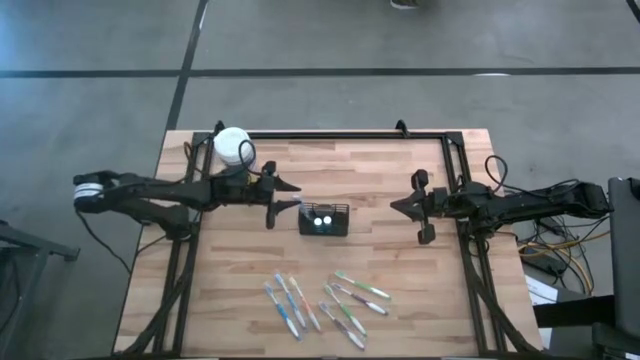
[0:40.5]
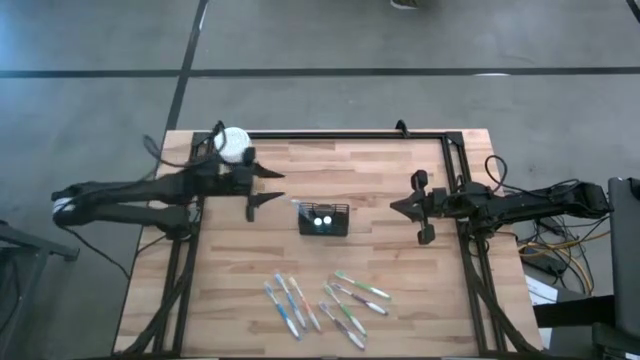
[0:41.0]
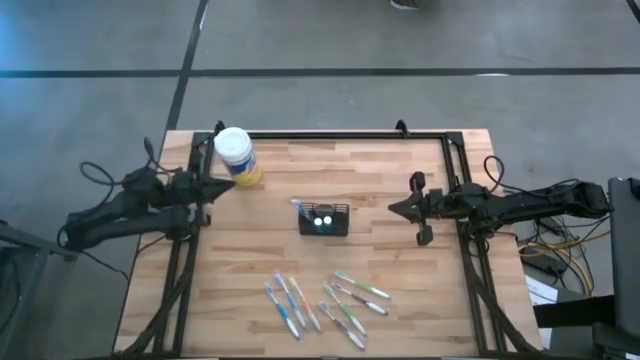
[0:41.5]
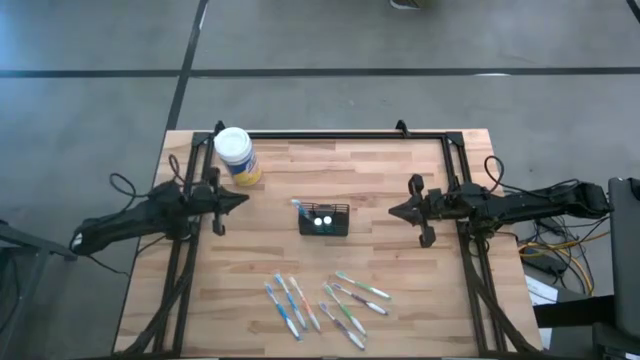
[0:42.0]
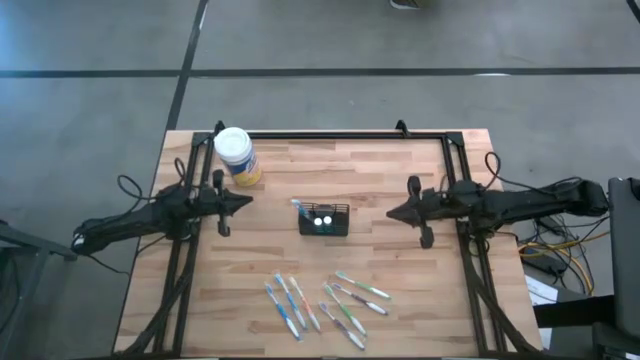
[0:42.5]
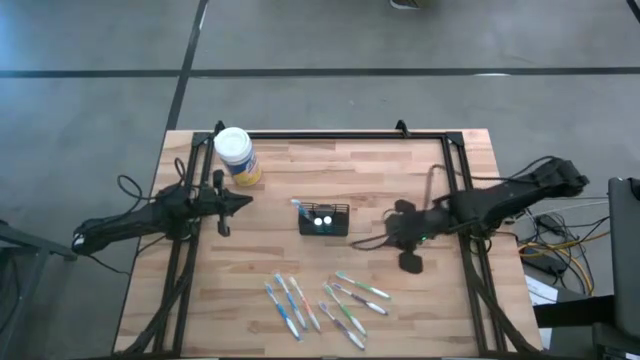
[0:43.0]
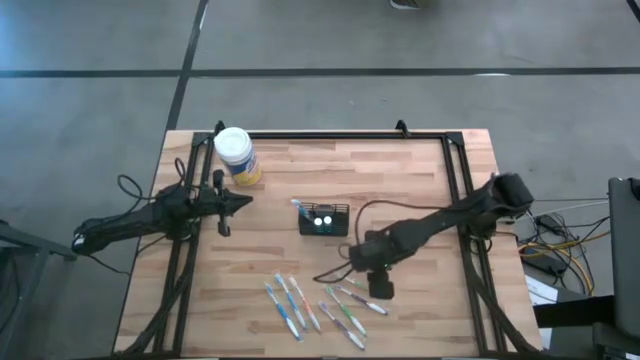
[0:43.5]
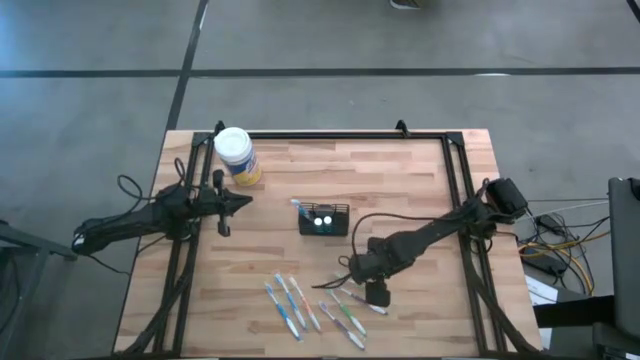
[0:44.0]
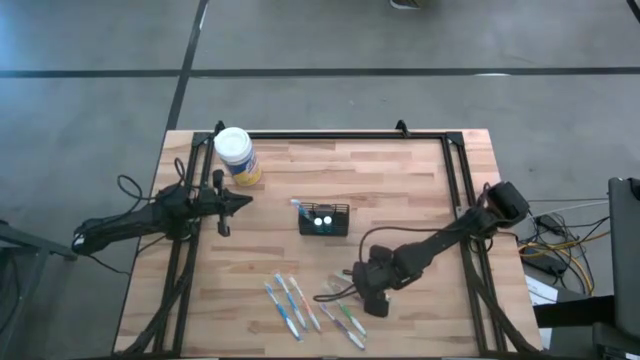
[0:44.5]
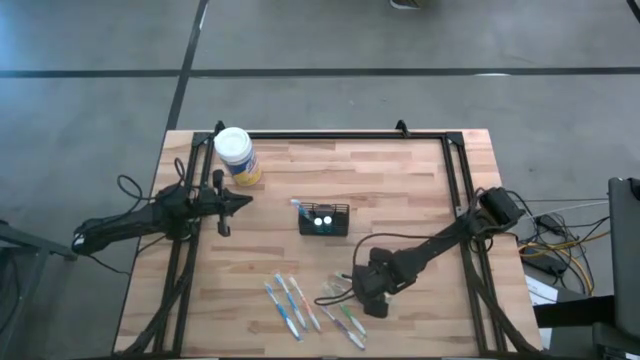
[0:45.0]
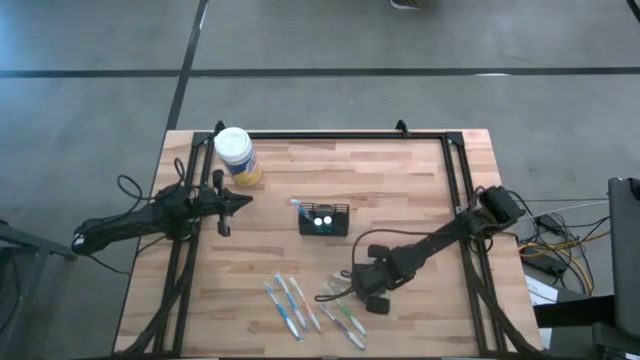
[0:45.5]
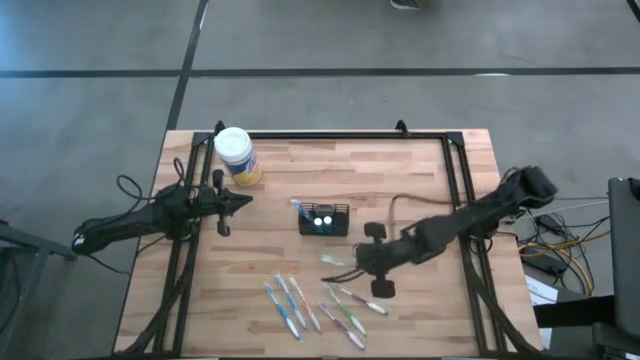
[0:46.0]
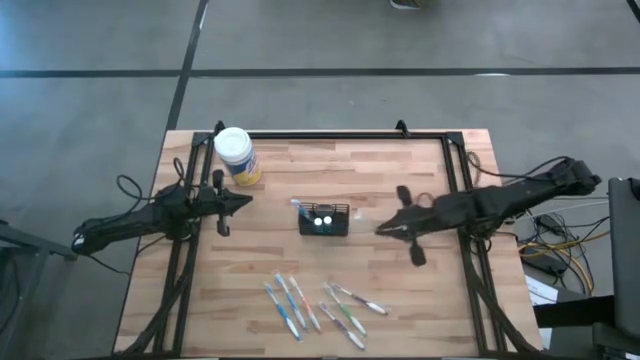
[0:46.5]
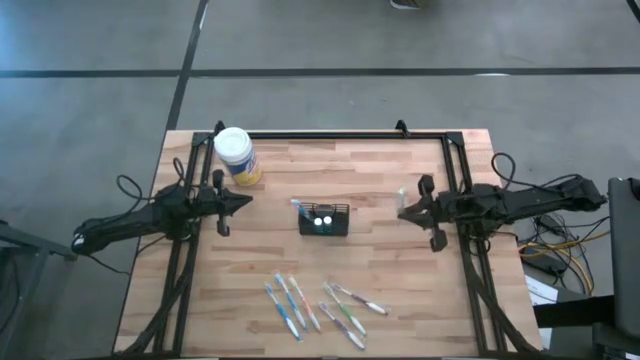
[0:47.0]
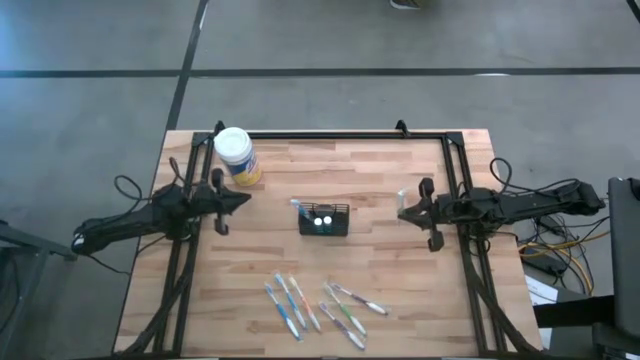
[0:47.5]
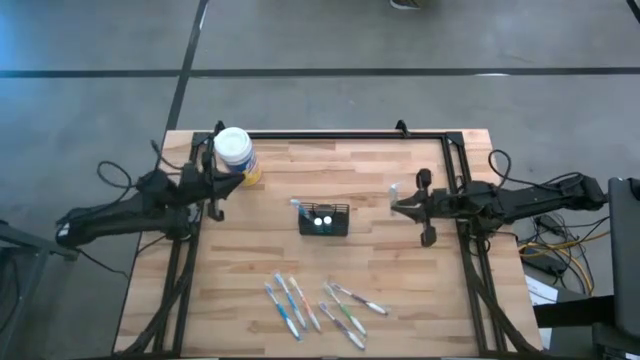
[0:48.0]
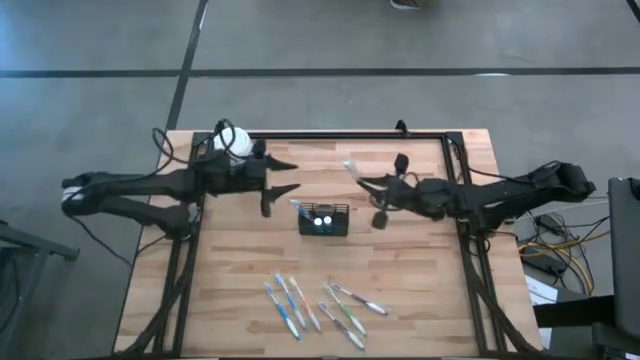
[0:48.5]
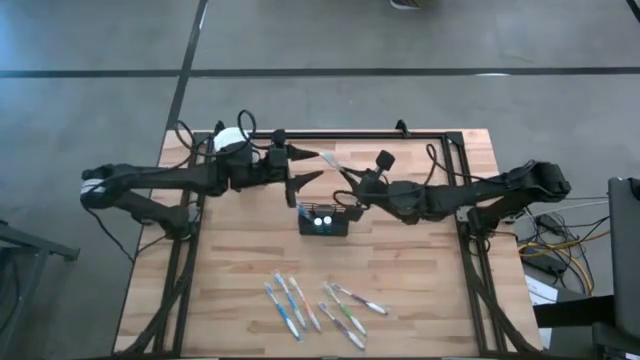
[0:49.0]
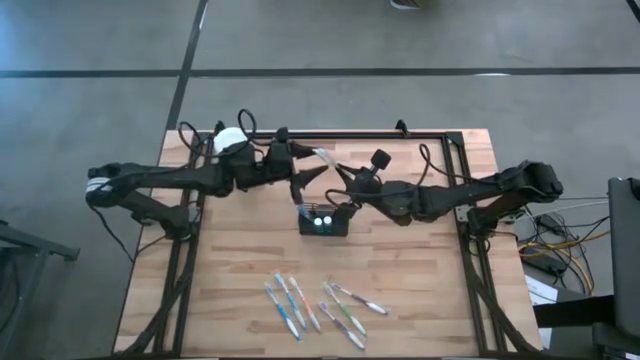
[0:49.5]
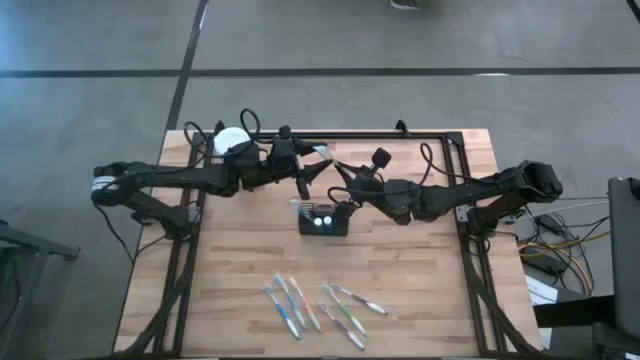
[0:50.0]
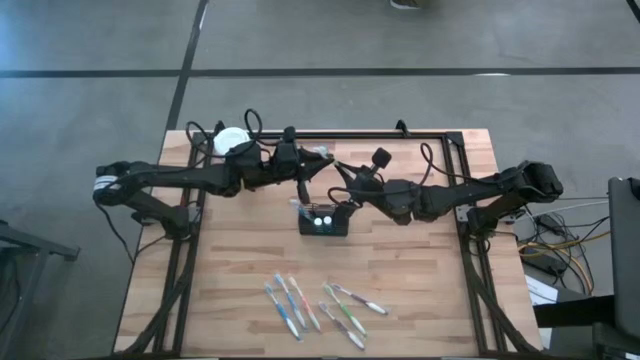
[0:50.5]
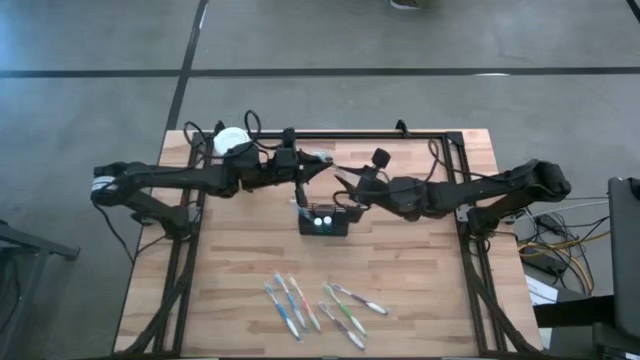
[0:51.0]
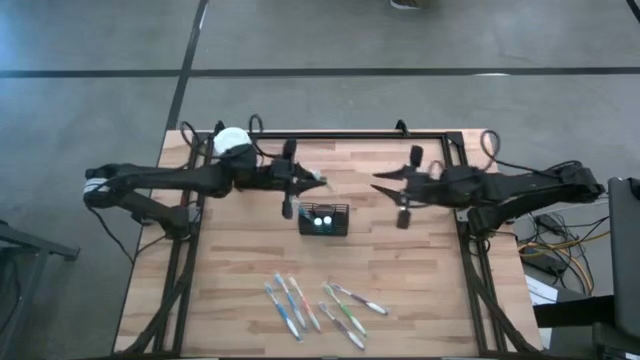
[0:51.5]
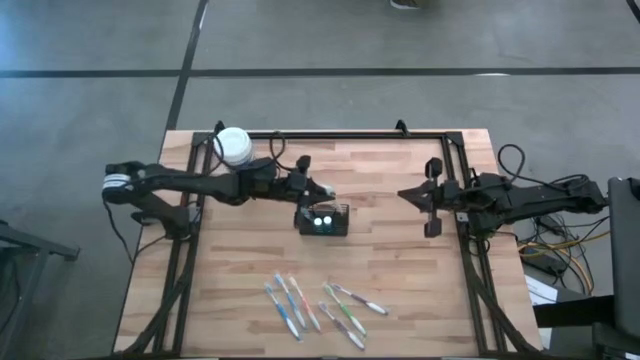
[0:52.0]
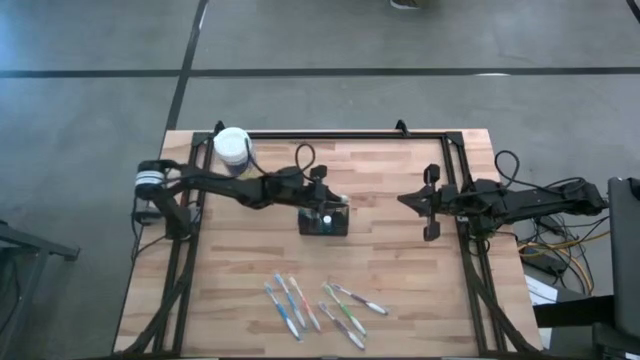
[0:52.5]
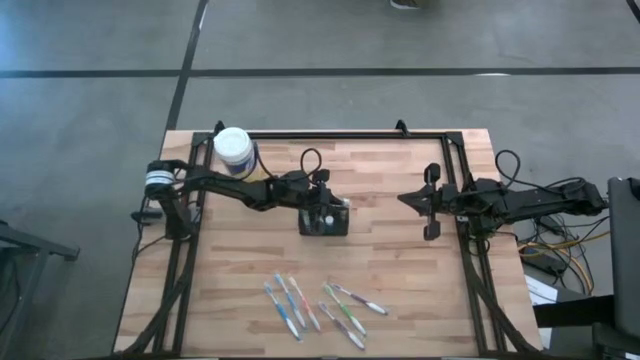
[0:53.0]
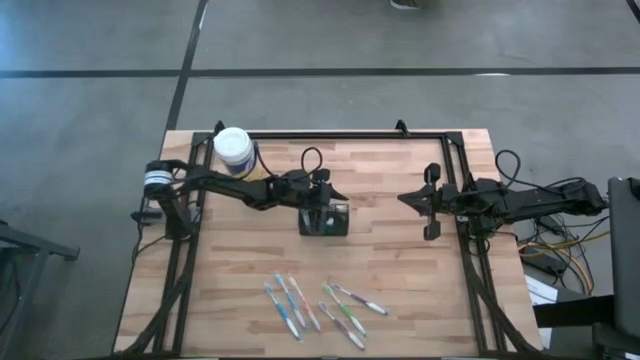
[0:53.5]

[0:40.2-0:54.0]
Task: Pick & Place toothbrushing station
Put the right green toothbrush into the wire organizer

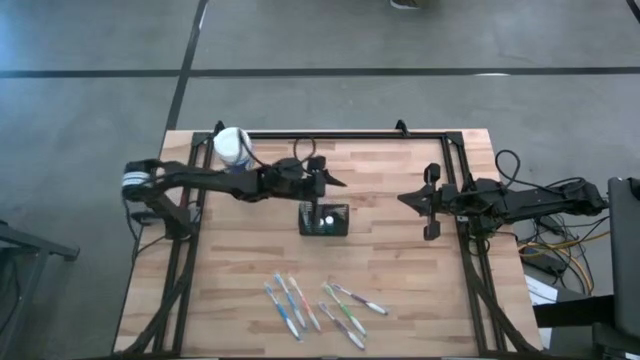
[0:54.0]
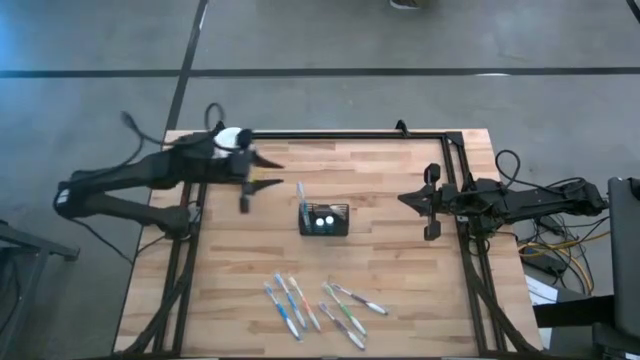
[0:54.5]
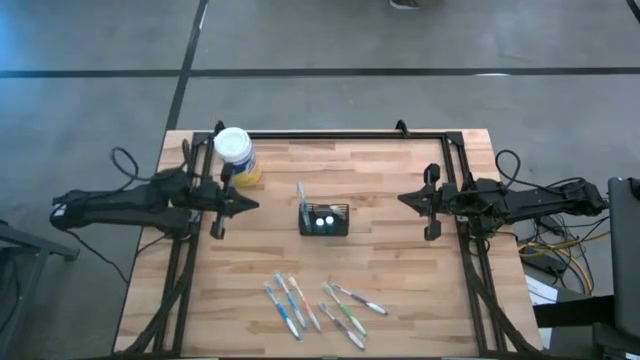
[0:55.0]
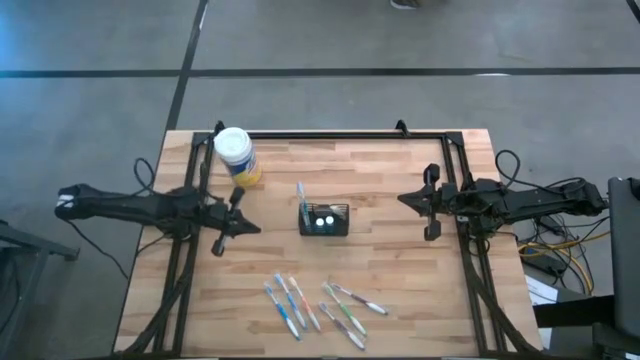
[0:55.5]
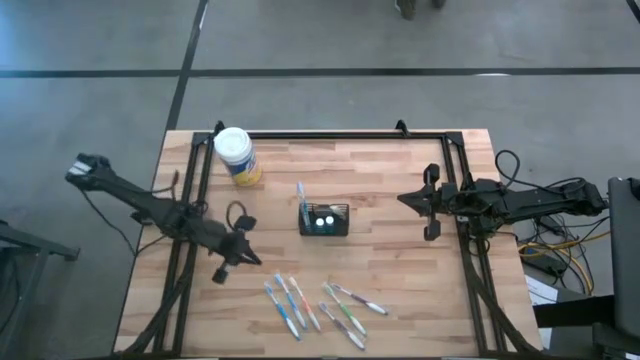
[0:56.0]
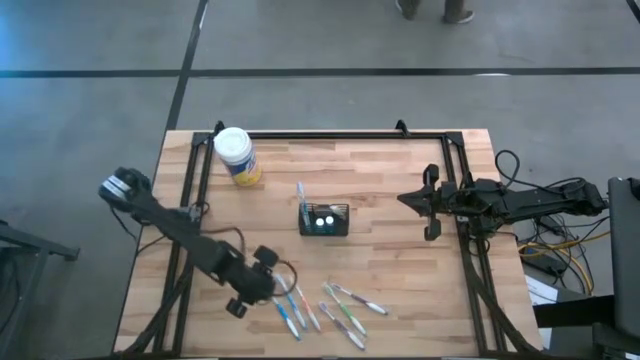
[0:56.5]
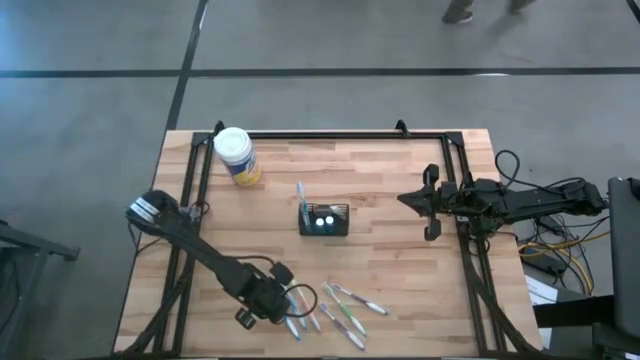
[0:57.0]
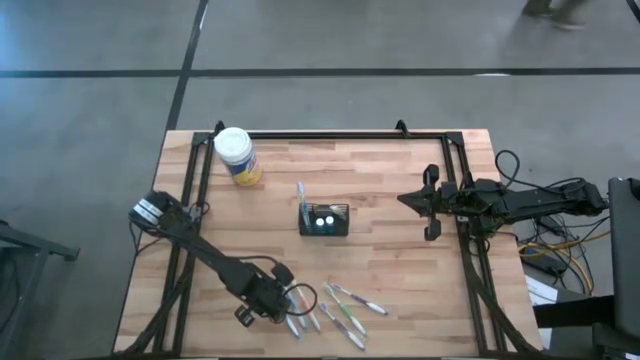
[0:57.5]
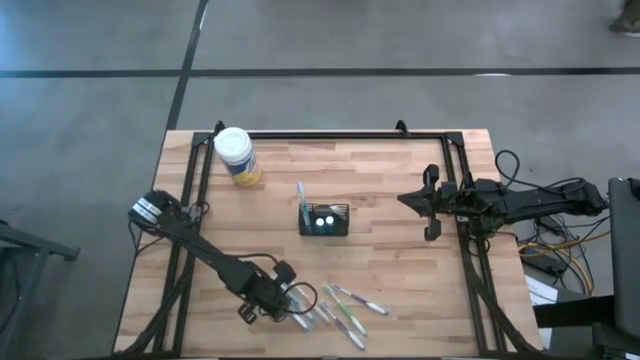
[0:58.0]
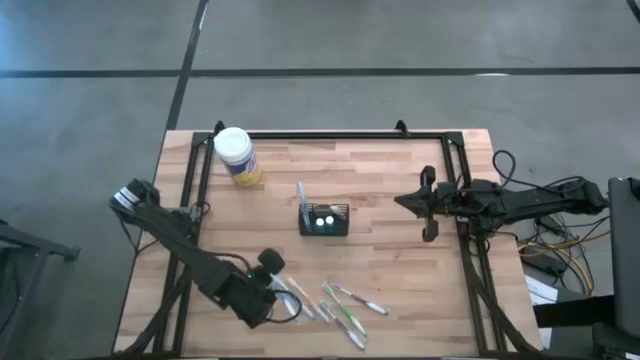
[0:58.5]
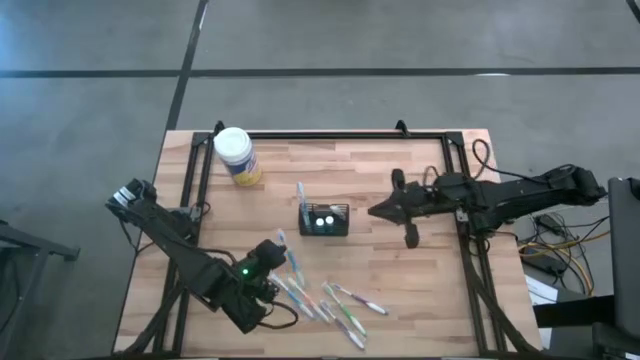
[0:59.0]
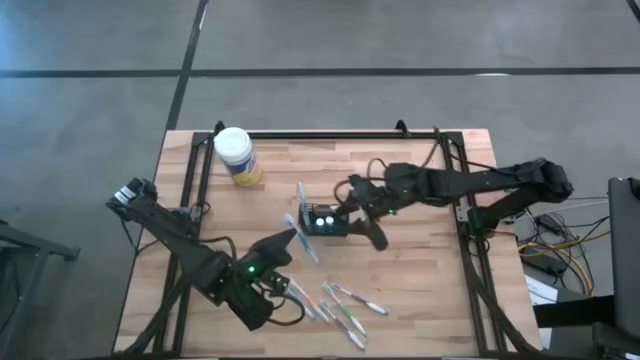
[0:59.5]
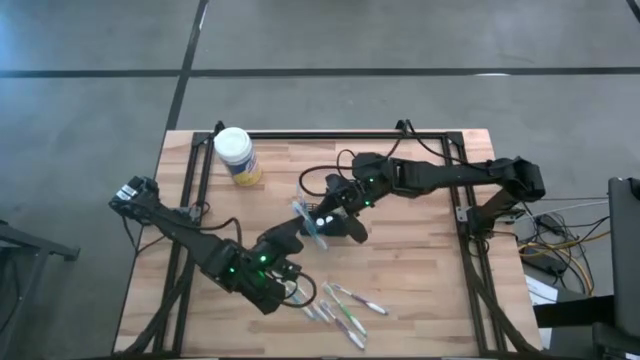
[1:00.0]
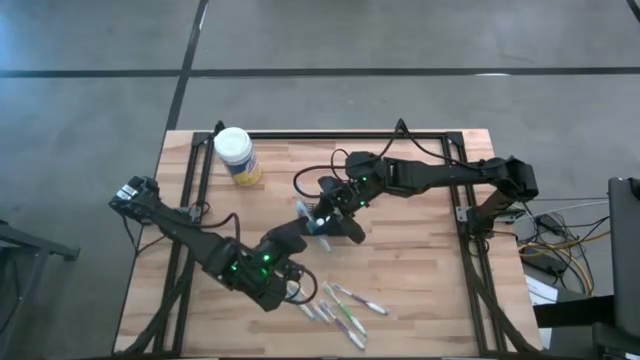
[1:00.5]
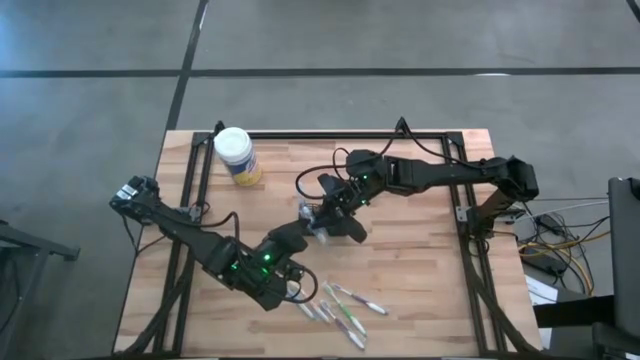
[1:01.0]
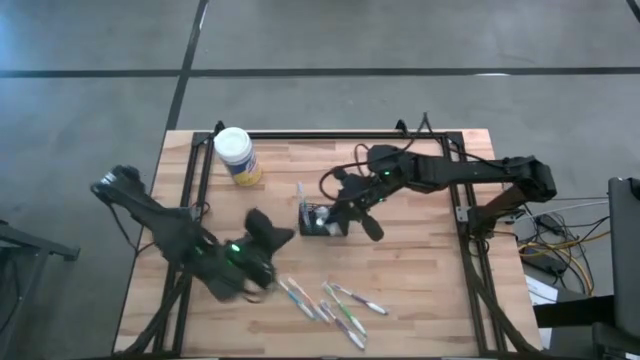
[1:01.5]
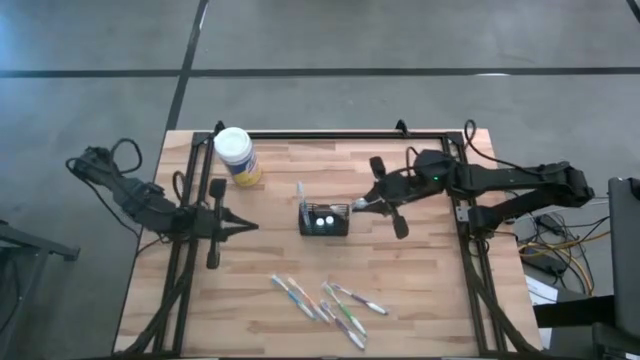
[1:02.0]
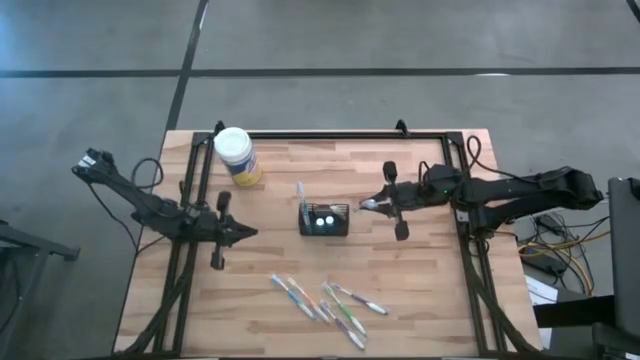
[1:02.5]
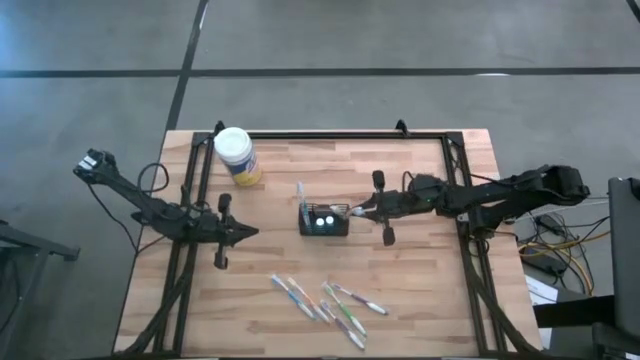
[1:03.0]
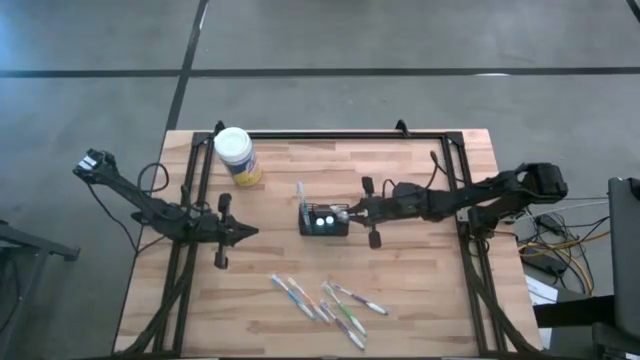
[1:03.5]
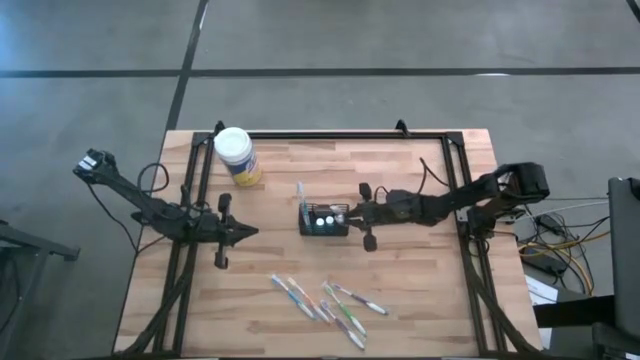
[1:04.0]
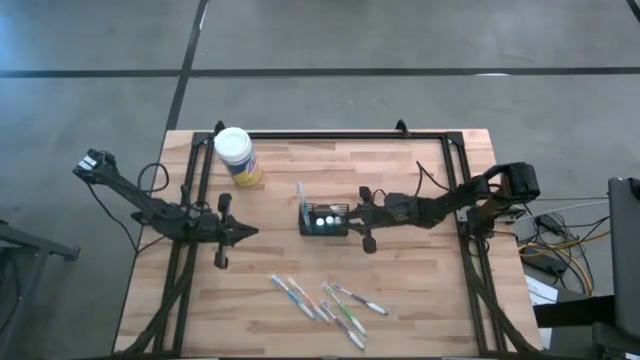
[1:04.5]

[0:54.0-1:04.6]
Put the left blue toothbrush into the wire organizer
